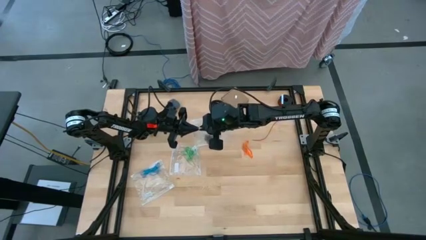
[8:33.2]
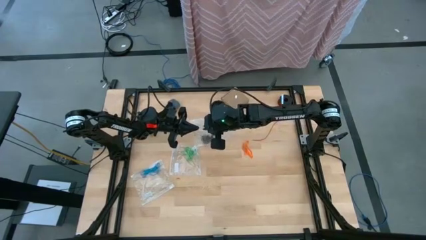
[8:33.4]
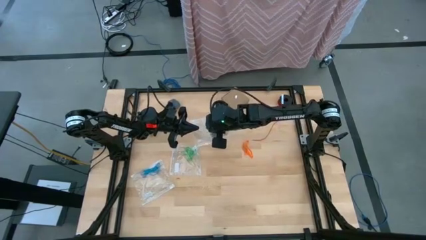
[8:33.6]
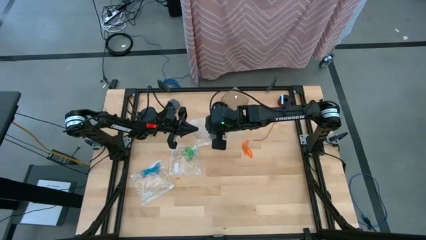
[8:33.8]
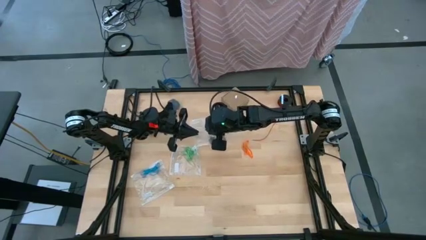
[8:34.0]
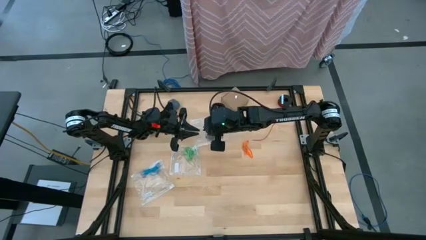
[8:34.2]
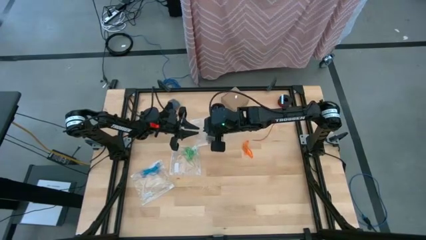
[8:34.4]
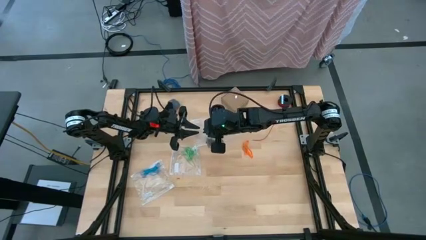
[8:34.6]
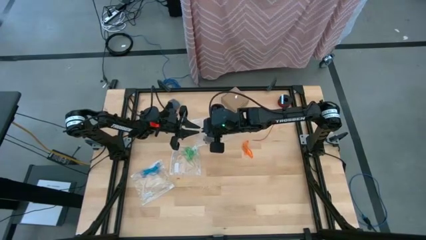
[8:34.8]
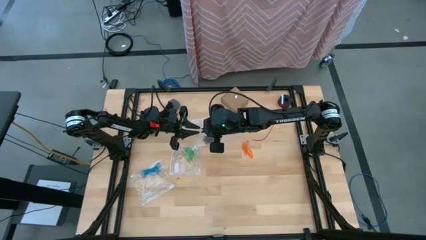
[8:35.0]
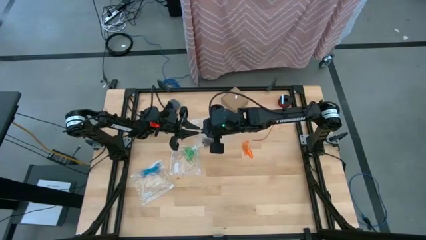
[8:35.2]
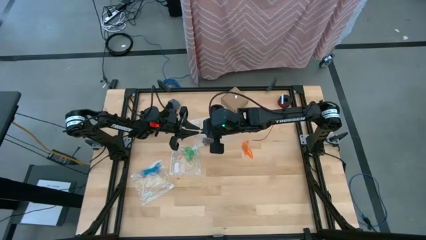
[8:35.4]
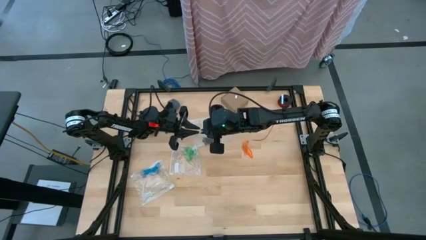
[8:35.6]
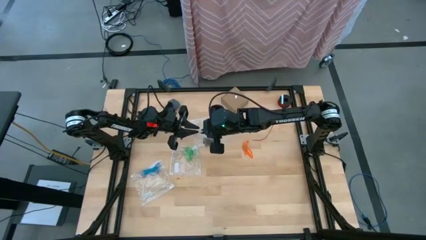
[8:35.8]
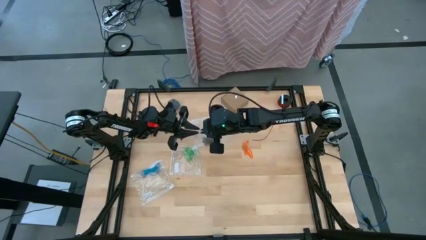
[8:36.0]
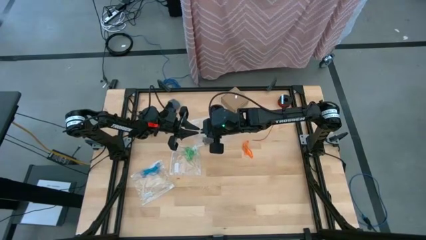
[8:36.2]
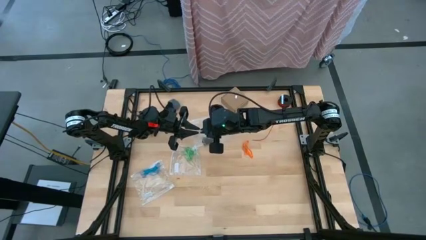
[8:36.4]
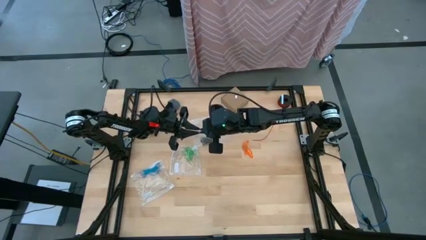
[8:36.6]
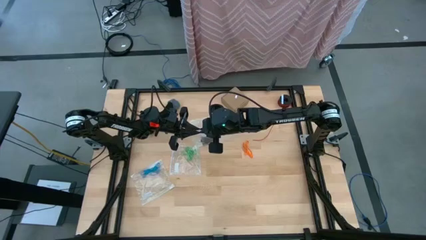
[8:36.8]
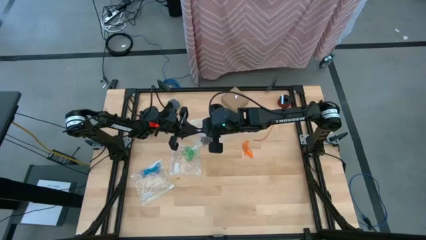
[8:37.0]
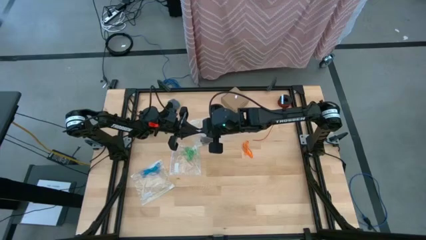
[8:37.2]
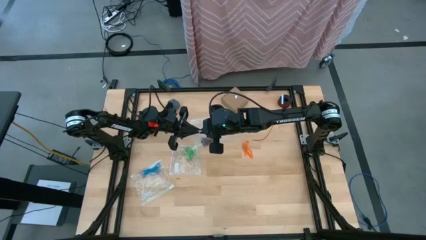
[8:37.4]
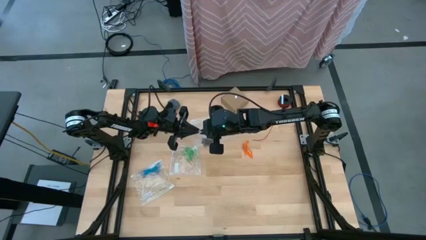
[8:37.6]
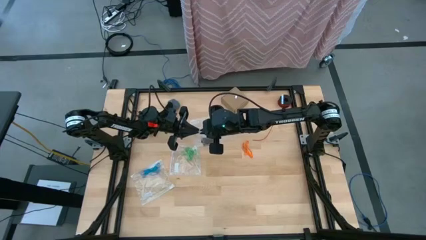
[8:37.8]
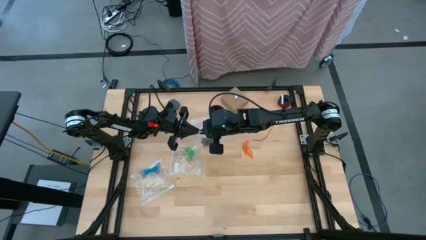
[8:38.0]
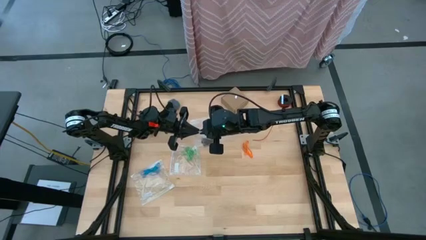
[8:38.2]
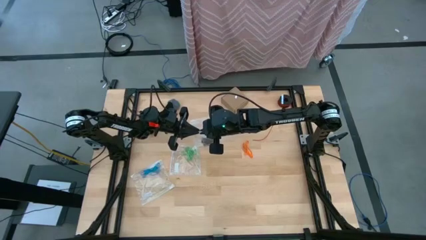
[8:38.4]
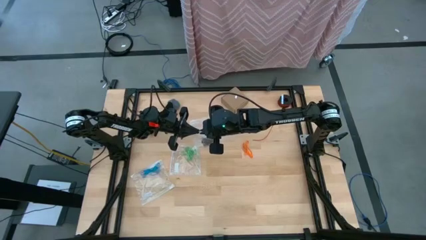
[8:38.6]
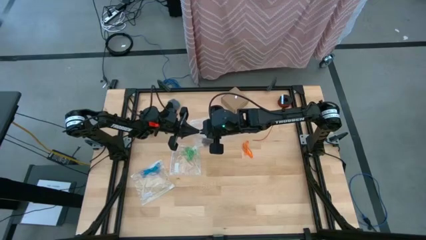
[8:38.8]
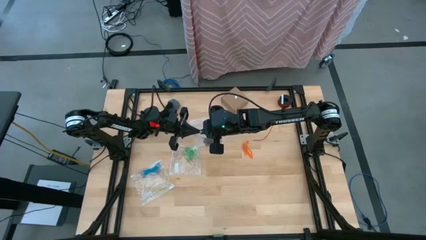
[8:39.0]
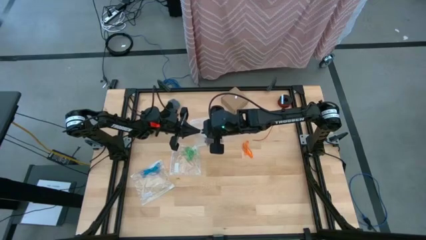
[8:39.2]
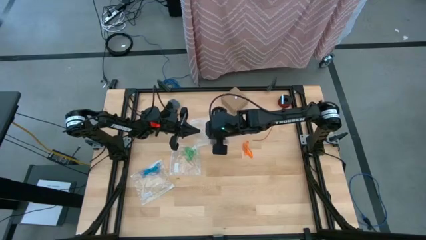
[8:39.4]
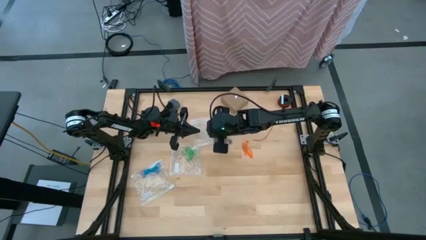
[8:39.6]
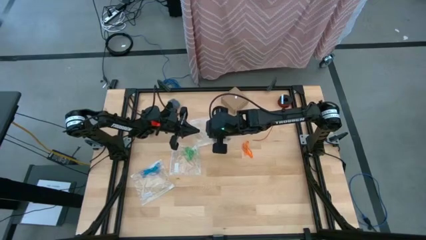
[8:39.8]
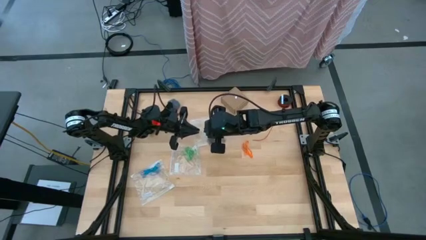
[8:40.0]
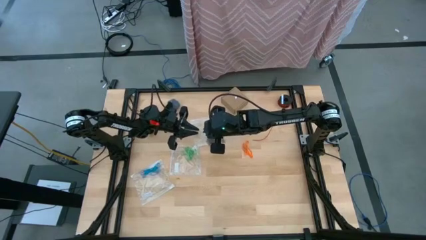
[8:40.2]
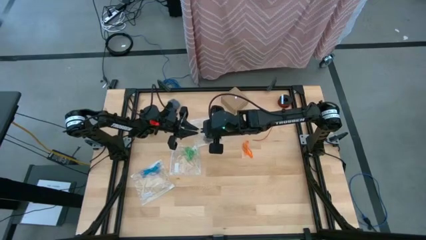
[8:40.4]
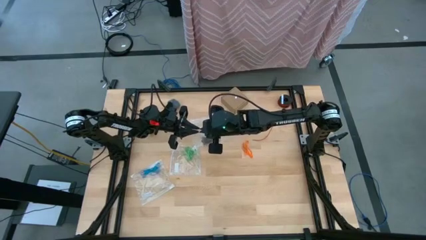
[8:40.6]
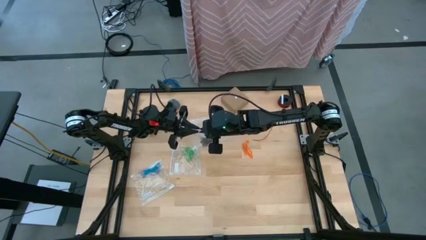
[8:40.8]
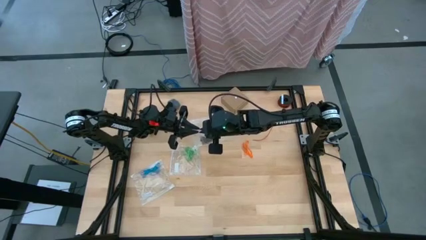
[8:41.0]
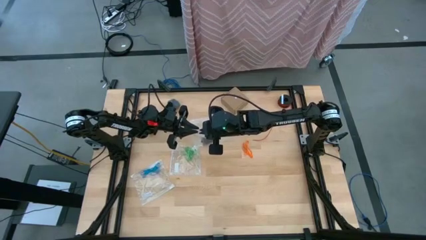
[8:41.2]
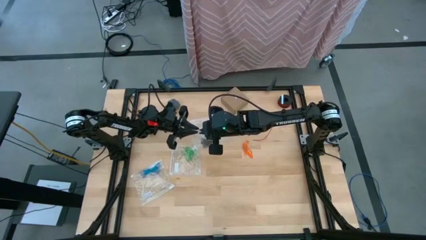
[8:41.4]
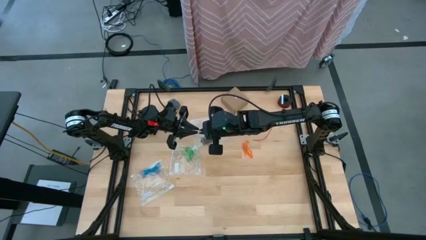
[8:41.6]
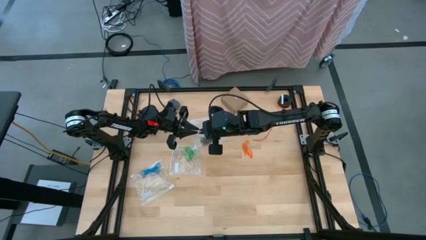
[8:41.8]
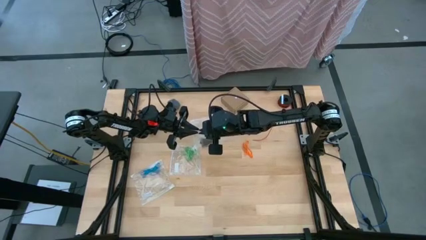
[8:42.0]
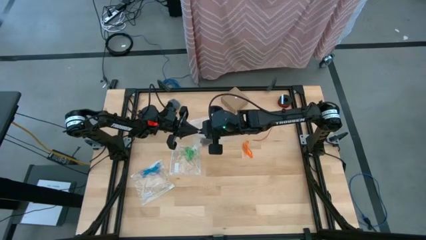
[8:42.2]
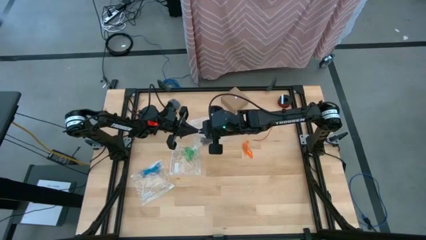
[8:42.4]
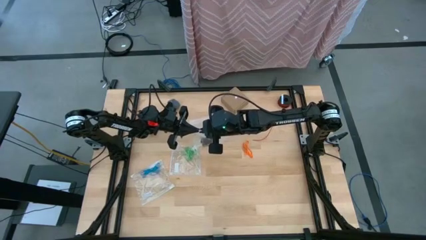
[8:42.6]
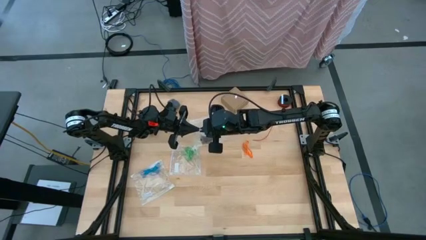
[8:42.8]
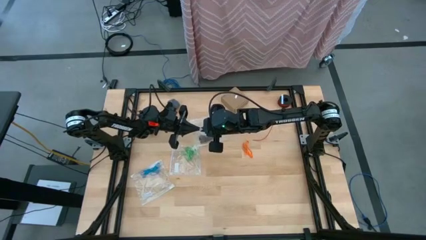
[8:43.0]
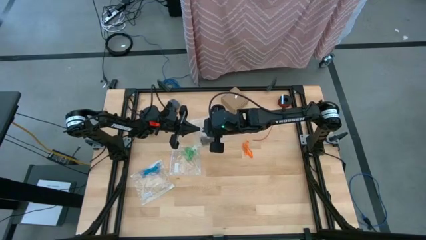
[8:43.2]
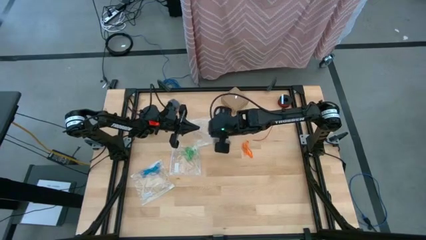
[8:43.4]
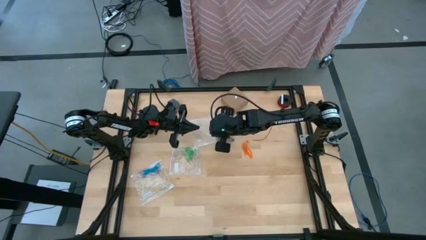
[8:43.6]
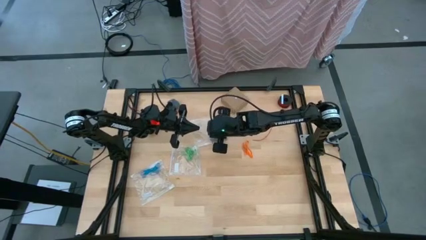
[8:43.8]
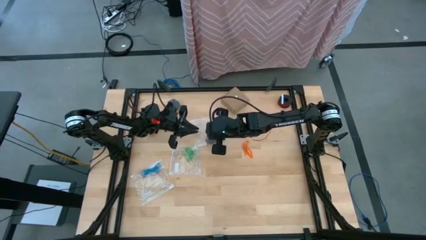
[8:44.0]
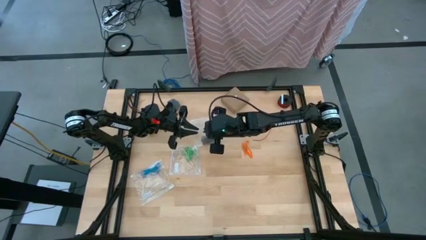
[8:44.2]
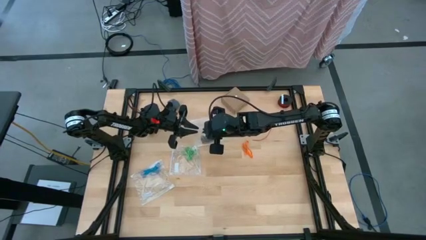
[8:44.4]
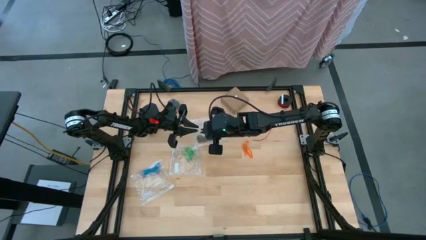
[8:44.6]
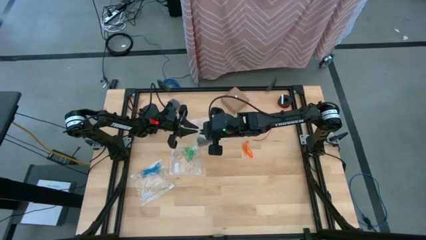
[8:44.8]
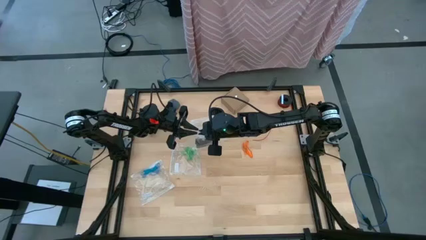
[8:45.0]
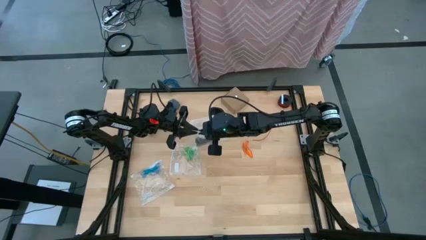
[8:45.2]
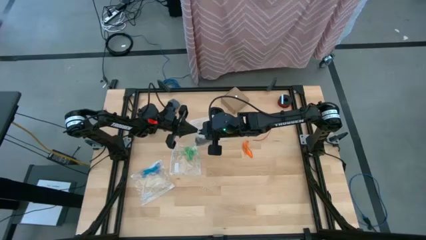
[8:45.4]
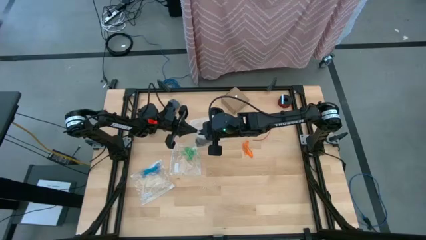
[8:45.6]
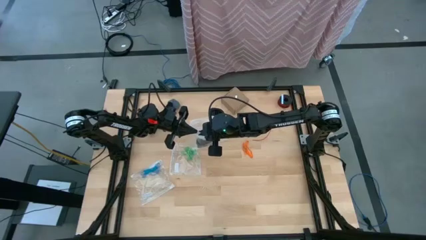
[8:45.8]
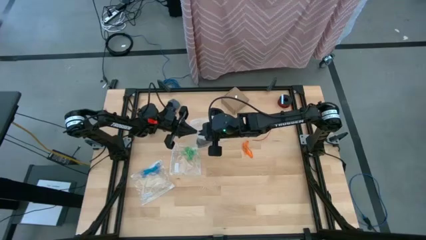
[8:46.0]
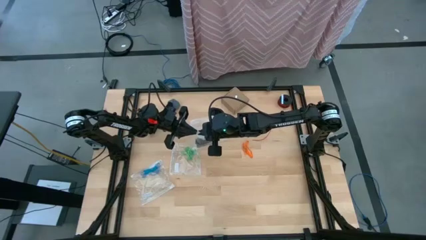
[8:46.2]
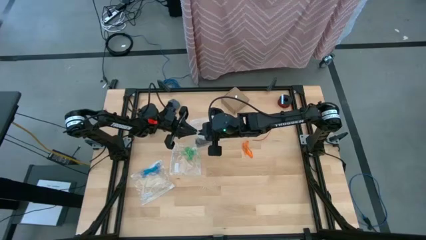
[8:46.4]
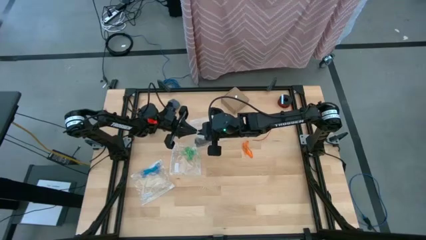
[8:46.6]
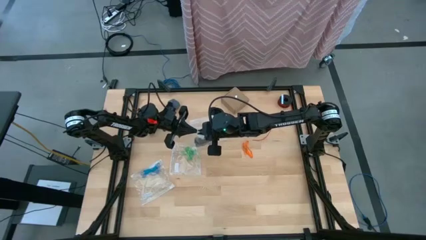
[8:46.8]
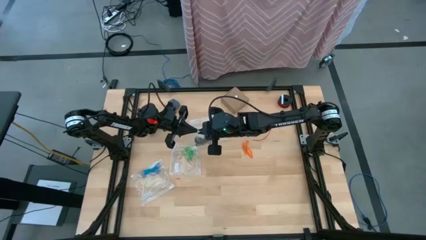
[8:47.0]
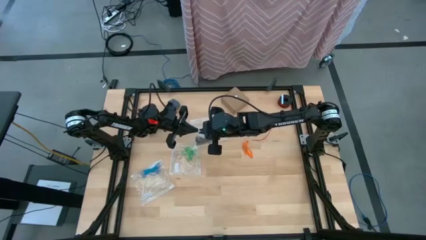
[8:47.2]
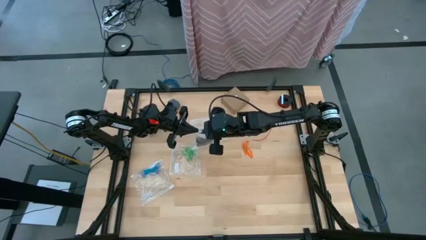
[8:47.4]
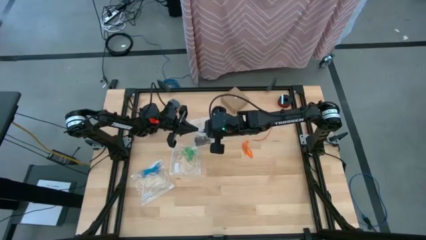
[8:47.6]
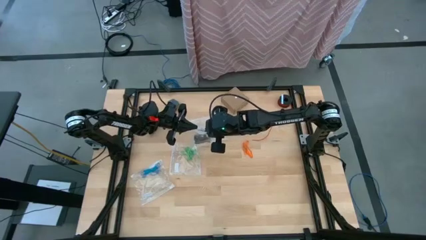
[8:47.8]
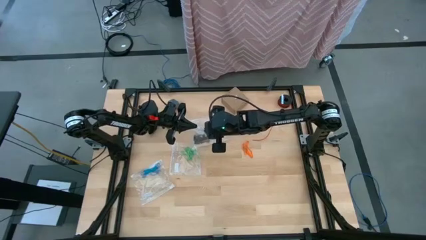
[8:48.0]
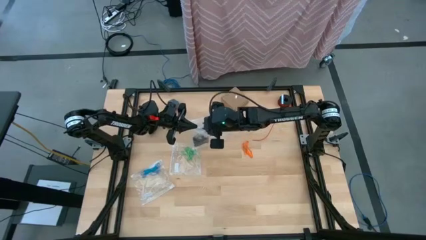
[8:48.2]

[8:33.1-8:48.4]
Task: Sort rubber bands
Close the transparent zip bag

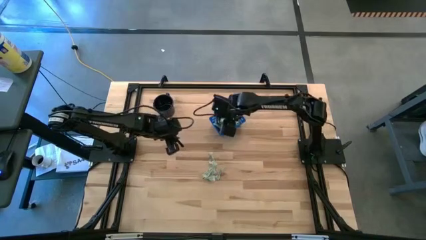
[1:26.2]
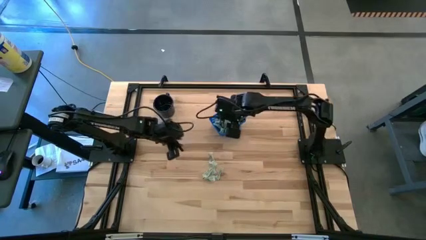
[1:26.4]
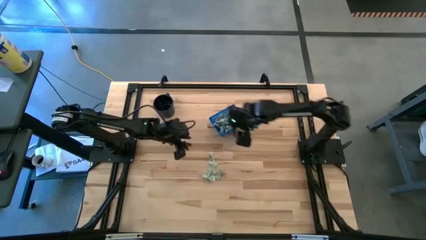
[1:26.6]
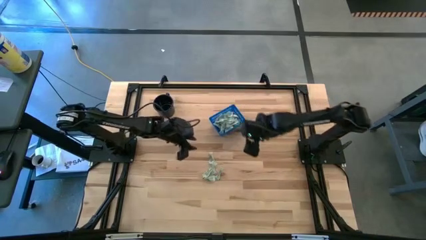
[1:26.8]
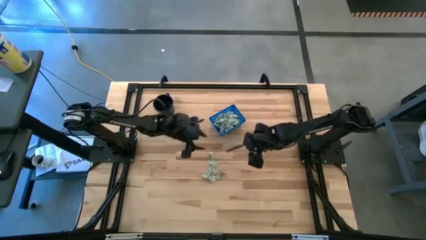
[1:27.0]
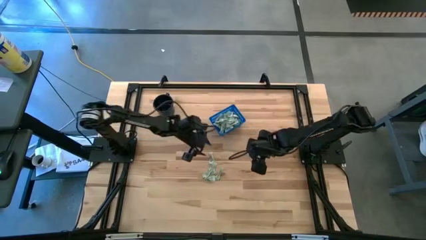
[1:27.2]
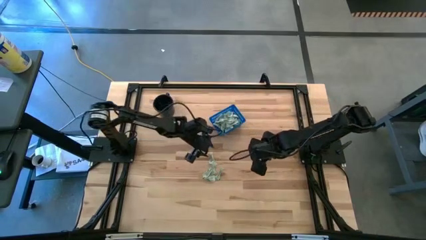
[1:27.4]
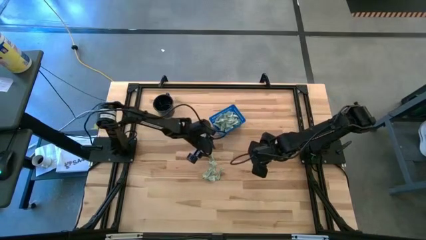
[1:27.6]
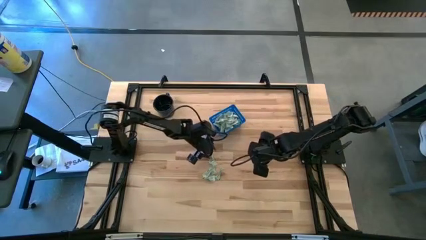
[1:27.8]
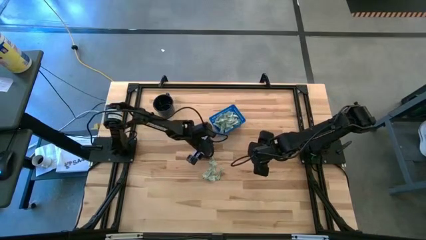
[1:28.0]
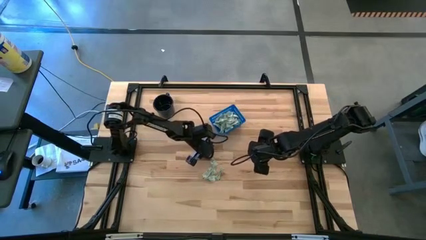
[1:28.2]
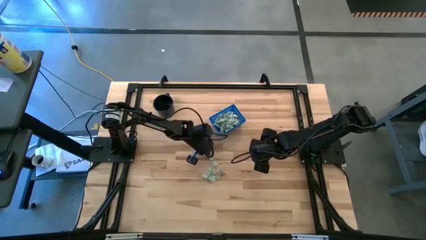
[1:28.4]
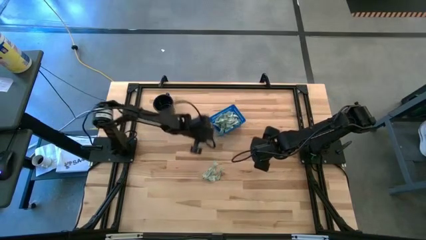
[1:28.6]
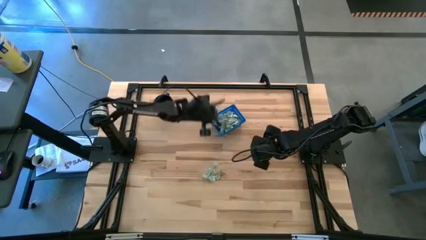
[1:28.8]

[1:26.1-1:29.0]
Task: Pick and place Stevia / Truvia into bins
Put the green stevia packet into the blue bin
